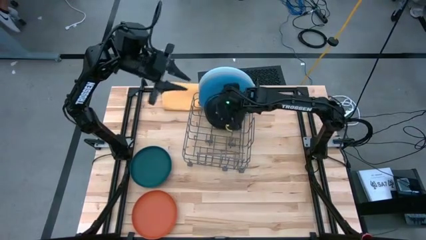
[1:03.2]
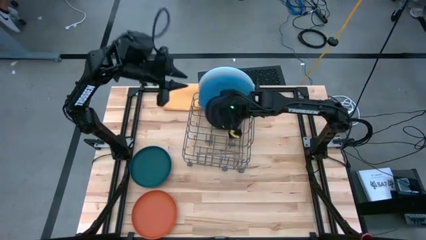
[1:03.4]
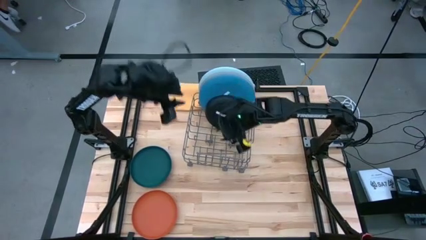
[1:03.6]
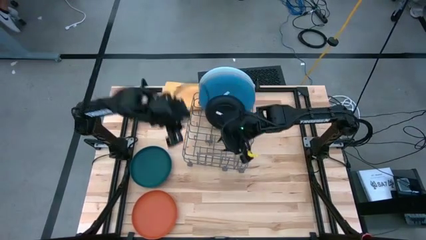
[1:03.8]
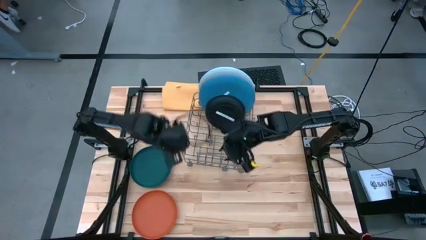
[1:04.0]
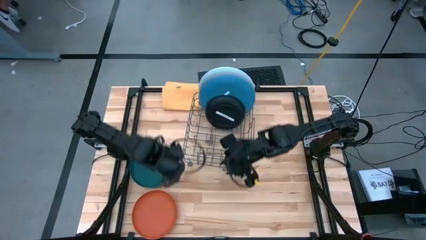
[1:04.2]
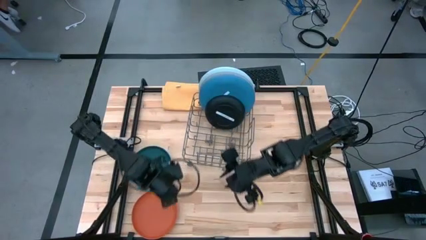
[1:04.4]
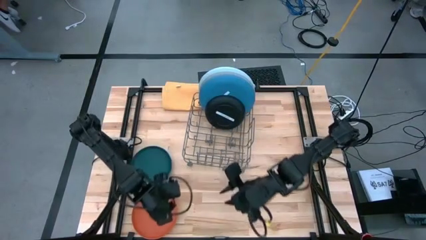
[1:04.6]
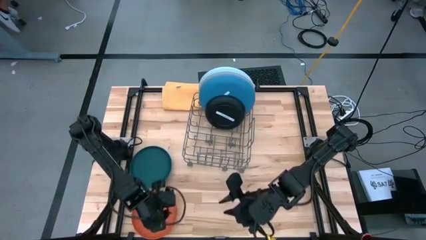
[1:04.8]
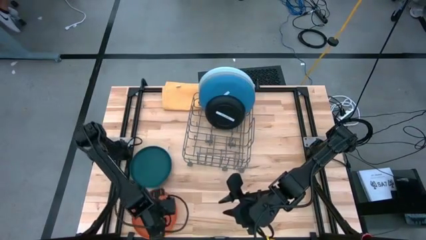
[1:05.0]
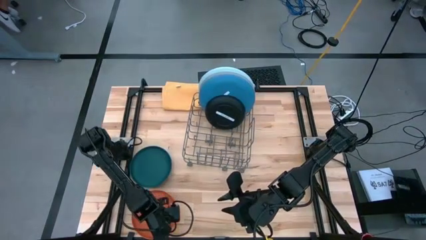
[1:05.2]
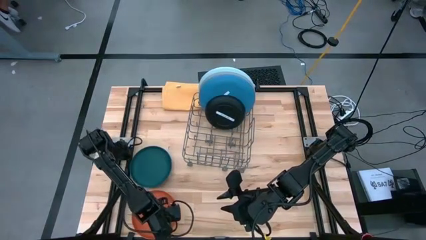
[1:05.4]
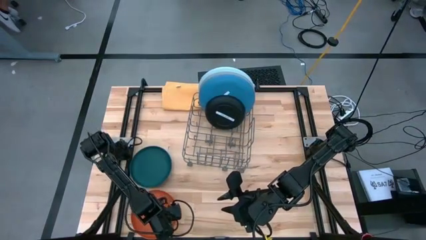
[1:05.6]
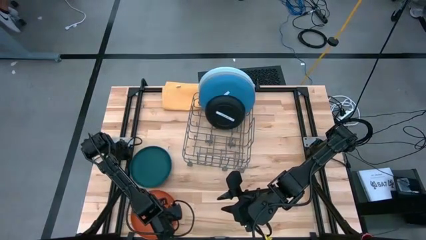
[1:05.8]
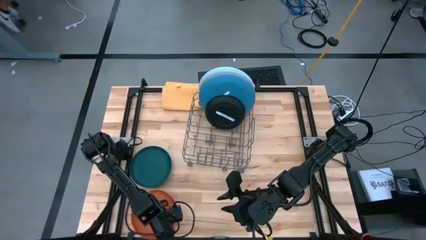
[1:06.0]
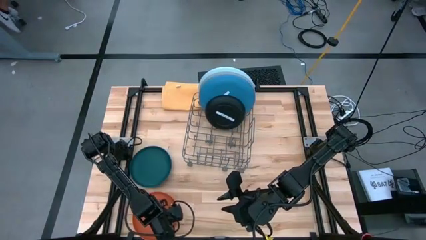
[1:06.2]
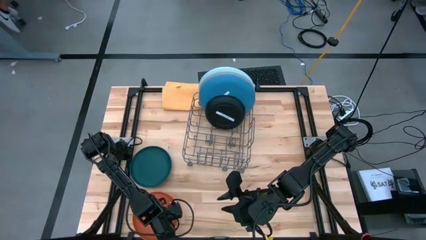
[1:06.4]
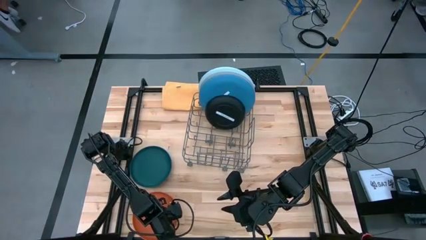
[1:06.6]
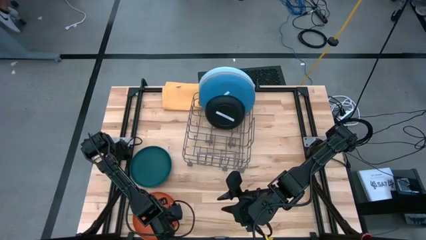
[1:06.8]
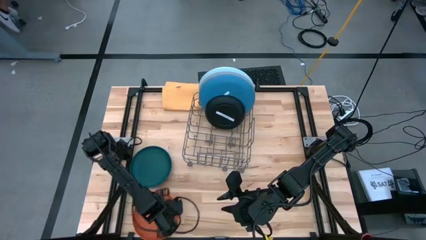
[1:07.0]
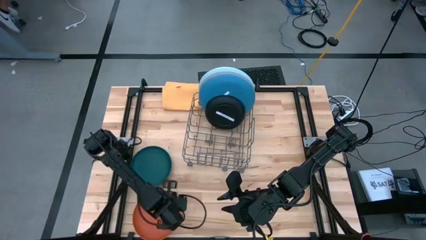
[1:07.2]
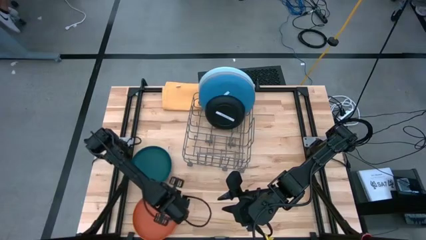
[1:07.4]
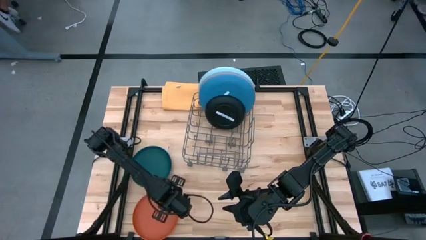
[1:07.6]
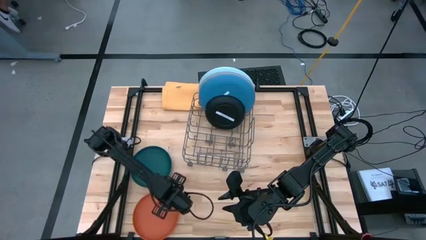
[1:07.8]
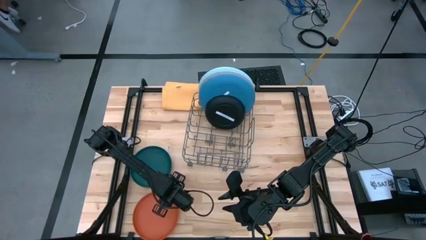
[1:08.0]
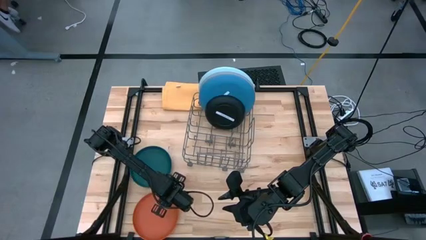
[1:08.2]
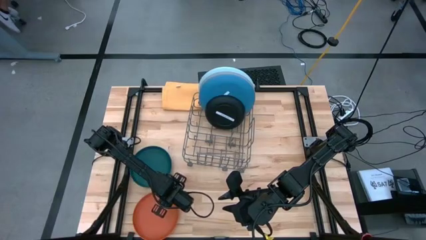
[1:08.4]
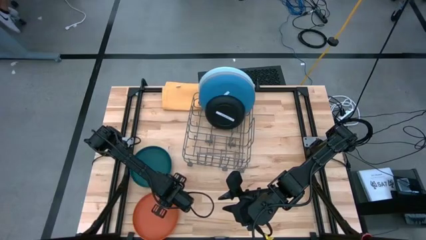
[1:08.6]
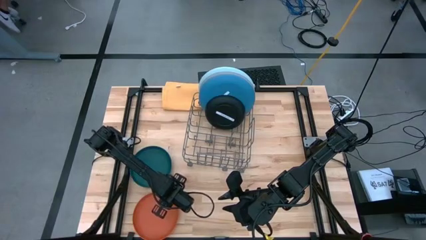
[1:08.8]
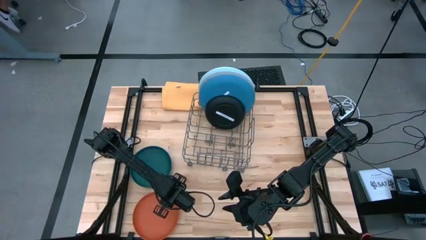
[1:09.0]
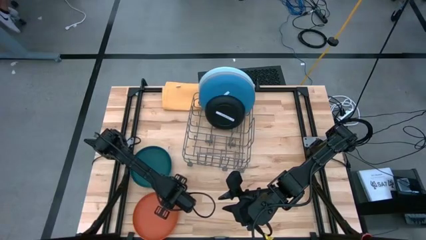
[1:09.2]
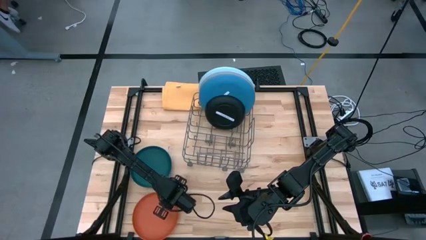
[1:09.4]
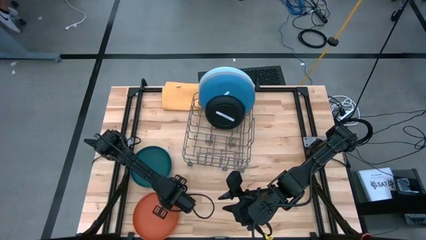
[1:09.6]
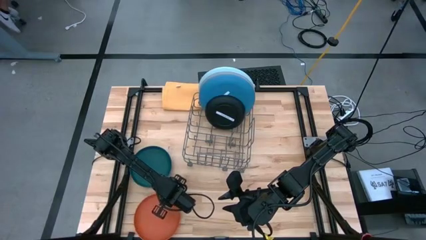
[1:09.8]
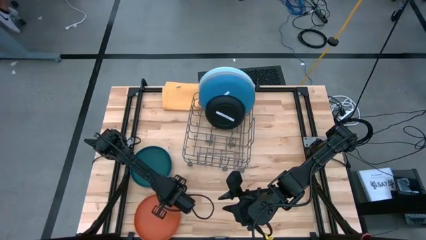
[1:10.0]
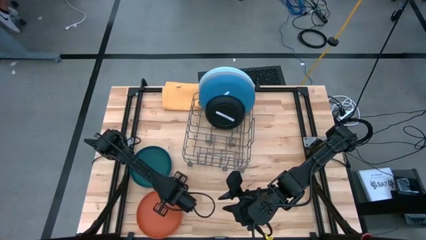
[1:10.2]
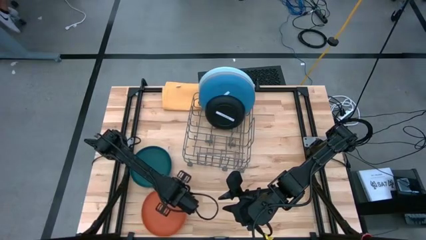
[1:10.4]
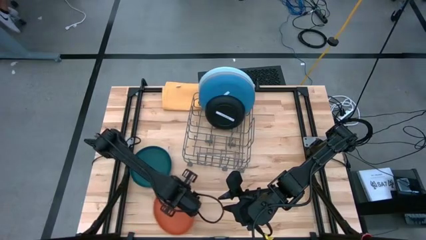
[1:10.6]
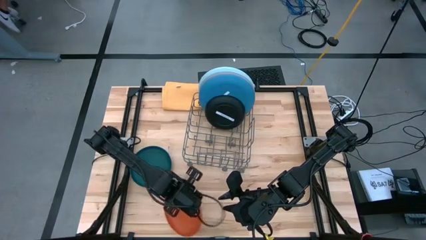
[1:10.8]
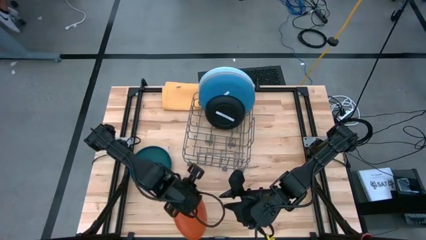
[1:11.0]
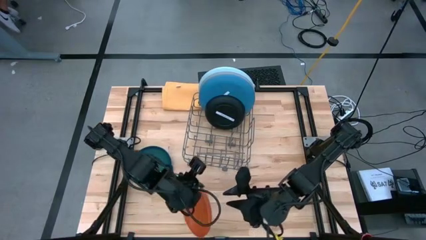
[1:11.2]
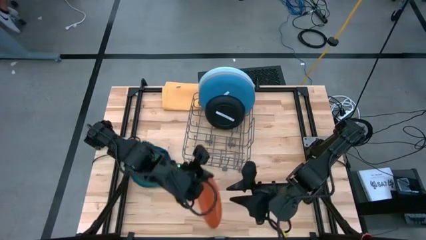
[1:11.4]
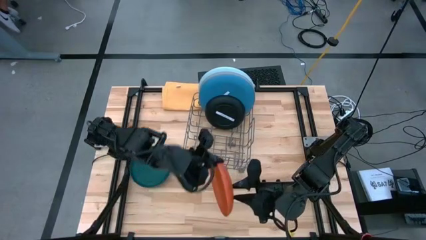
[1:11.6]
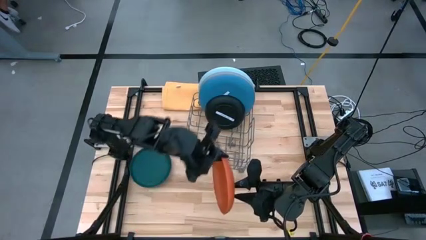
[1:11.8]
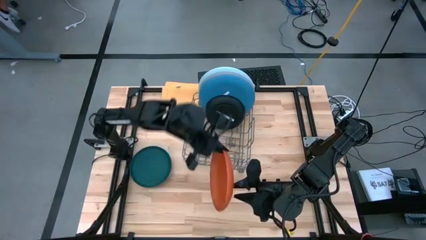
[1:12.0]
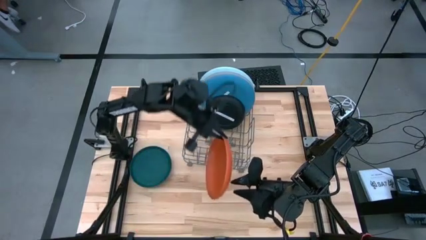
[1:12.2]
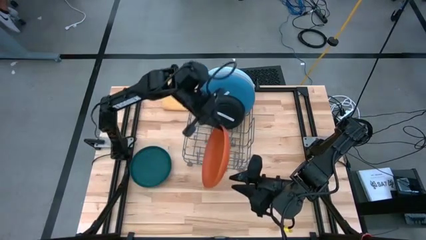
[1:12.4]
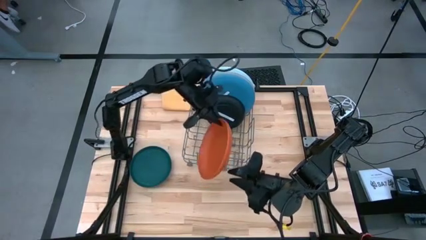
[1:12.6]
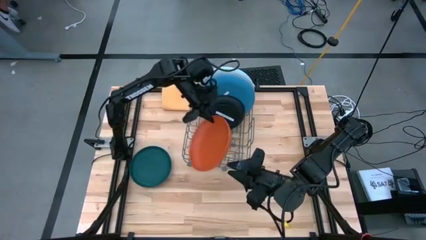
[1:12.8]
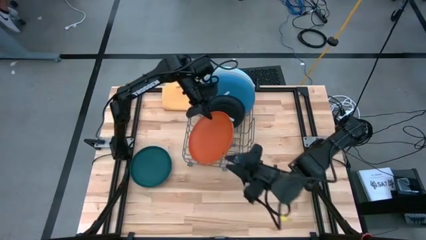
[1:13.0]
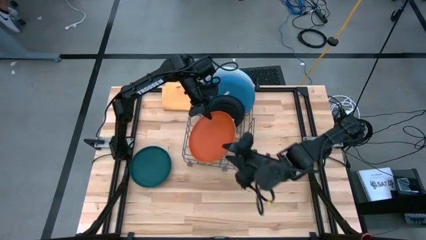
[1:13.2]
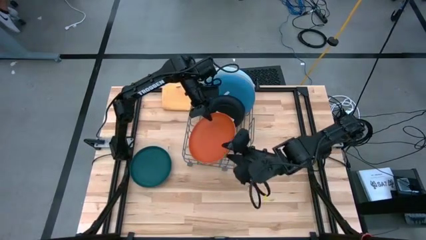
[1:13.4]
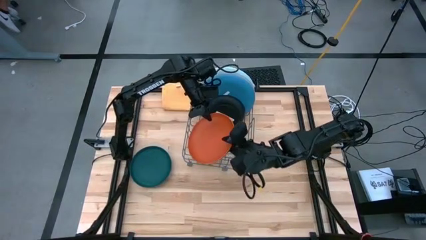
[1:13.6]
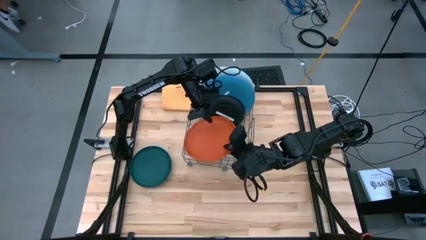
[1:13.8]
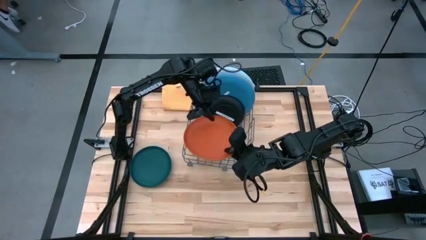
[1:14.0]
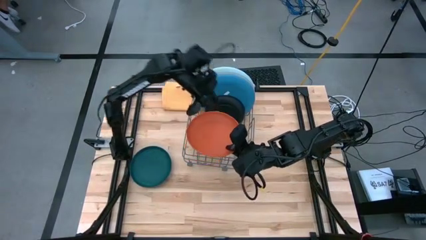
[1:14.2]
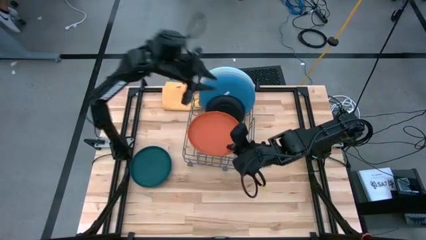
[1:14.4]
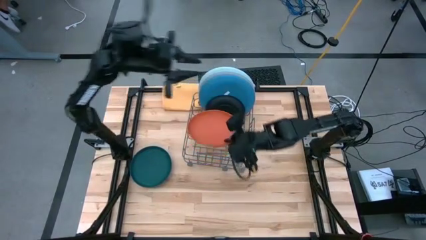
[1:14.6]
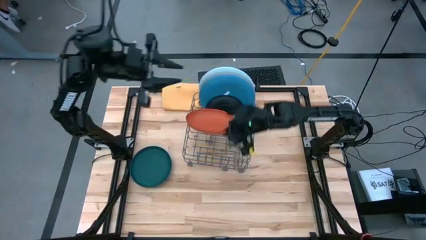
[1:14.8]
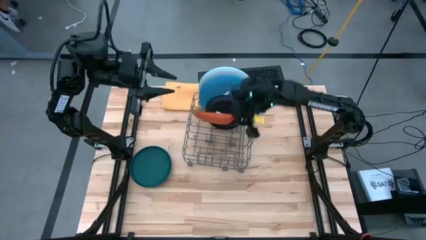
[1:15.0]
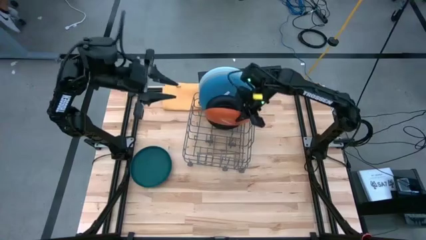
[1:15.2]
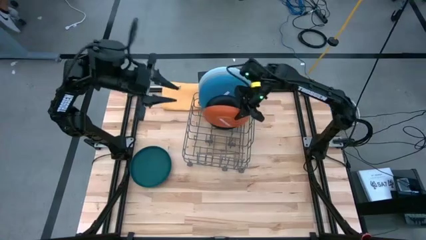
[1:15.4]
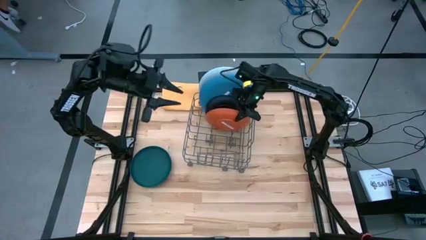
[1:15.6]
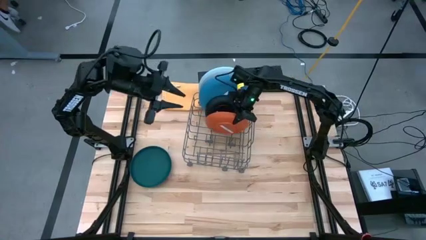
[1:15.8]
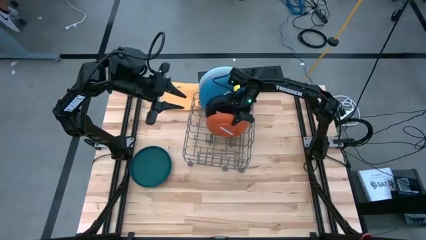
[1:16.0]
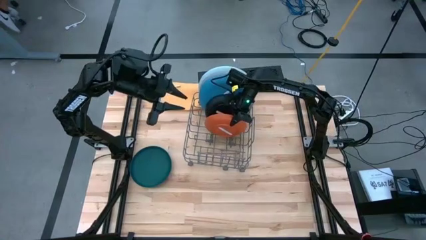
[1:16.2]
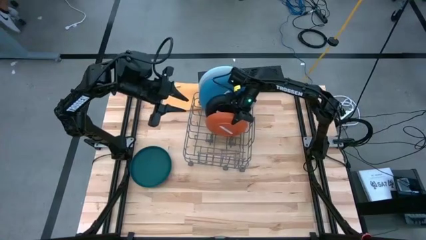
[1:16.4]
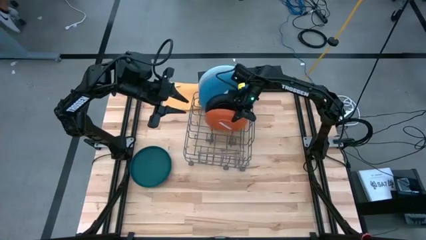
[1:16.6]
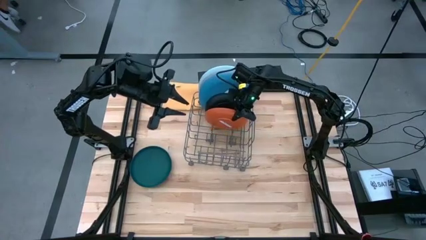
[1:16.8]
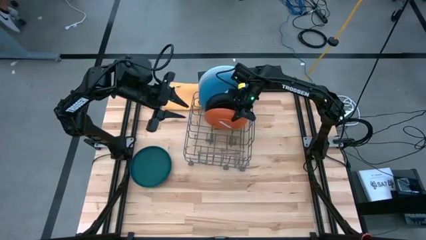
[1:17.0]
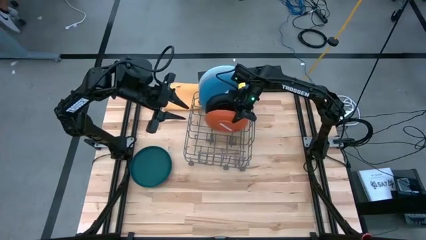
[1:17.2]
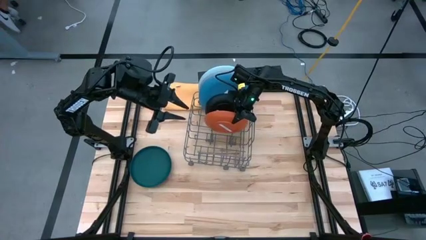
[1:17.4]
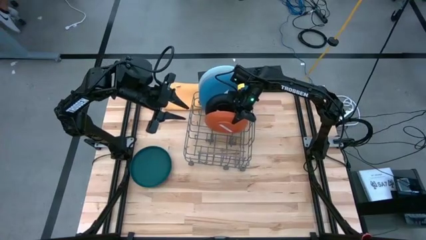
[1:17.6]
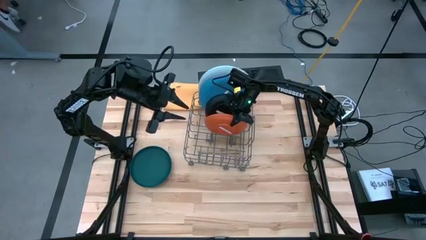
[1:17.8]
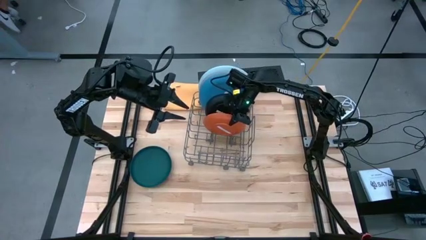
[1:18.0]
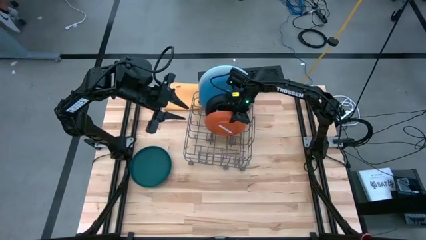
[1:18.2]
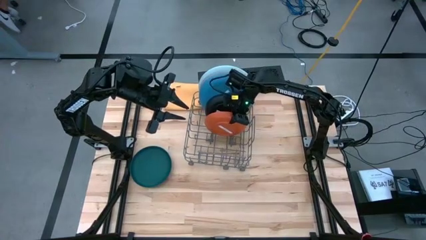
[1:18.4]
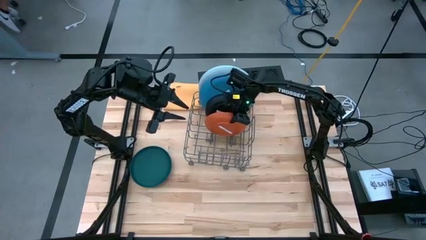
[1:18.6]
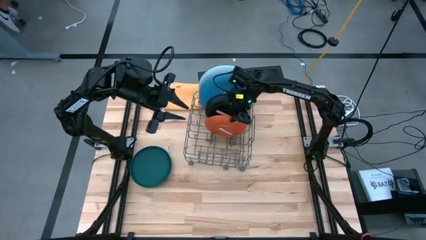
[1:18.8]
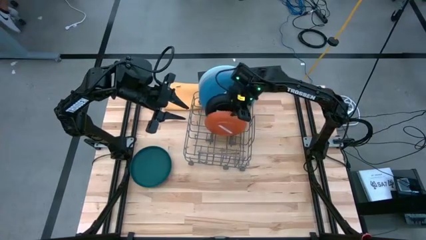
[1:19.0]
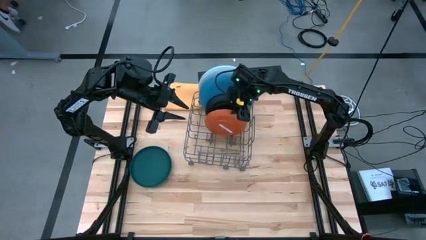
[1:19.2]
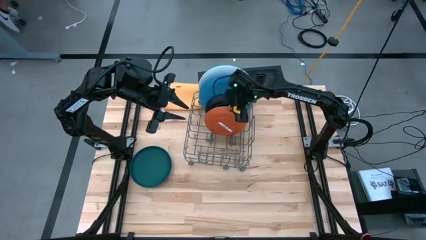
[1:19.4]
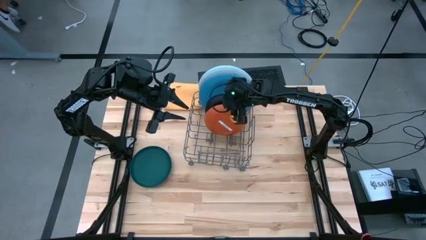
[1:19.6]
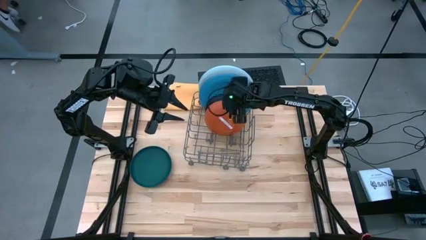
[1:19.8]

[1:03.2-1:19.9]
Task: Sort dishes
Put the orange plate into the dish rack

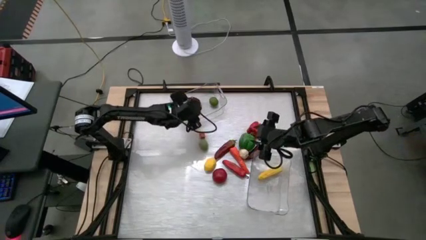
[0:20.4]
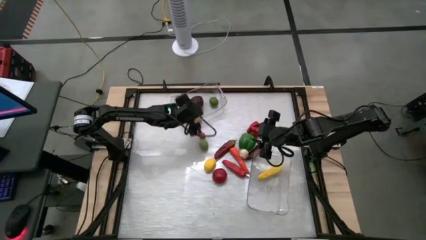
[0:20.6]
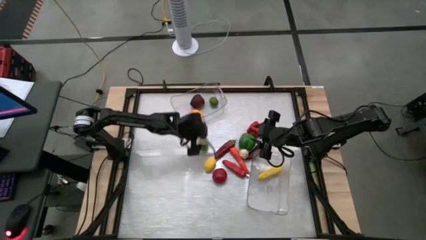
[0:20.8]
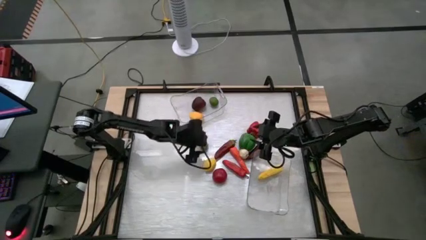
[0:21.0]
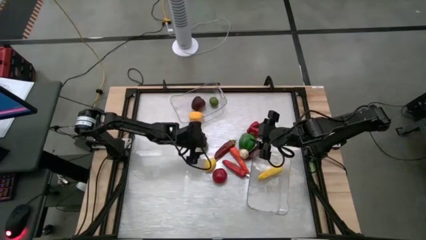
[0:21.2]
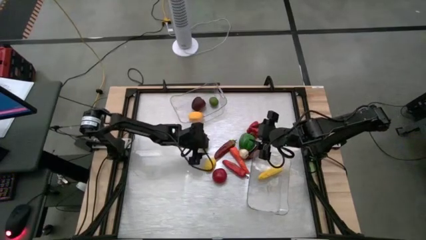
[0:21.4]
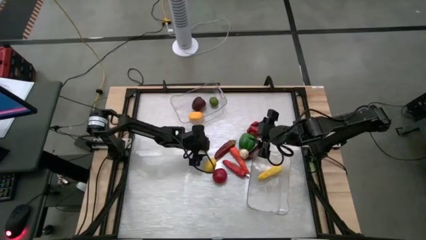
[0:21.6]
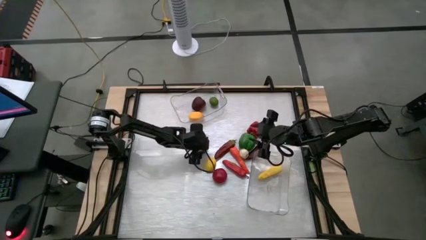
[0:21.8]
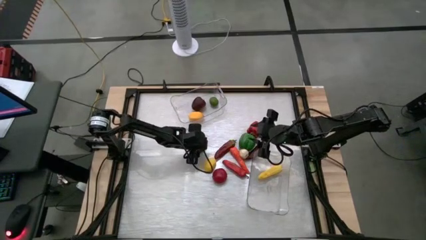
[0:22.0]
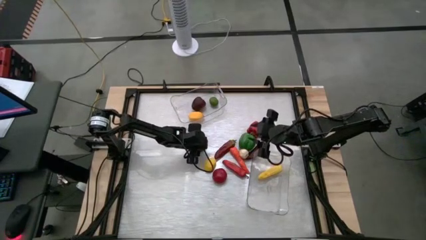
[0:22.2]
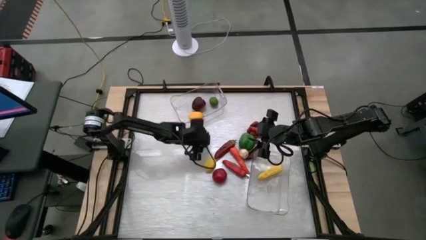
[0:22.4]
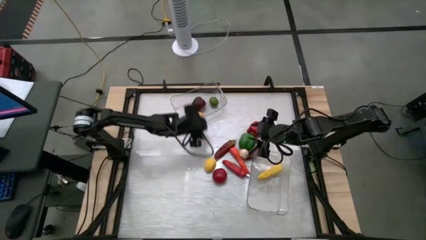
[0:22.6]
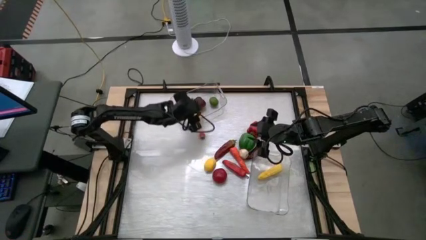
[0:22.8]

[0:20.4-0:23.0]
Task: Sort produce into baskets
Put the green lime into the top transparent bin
